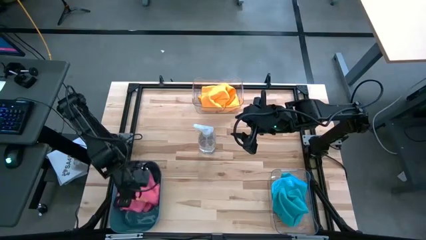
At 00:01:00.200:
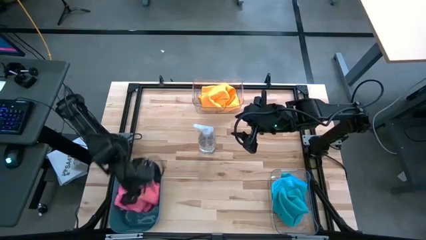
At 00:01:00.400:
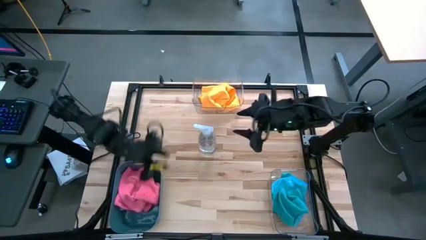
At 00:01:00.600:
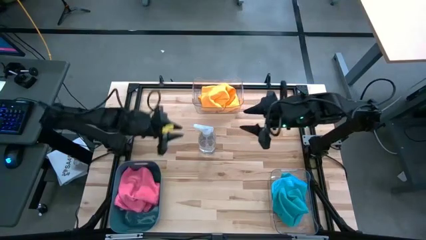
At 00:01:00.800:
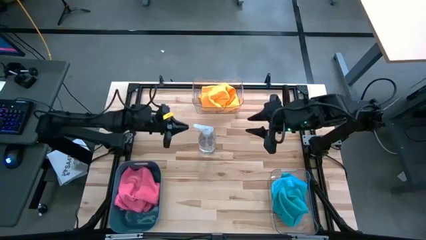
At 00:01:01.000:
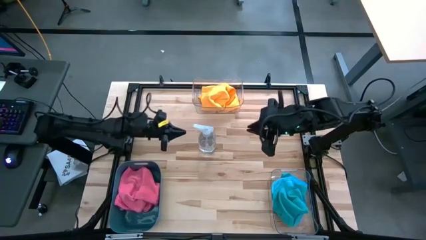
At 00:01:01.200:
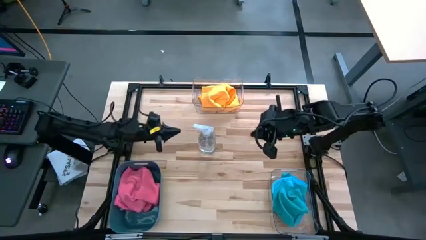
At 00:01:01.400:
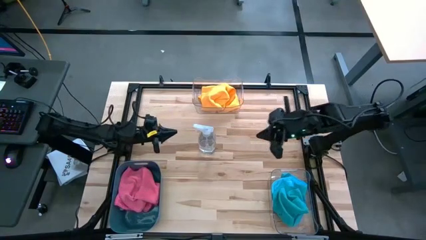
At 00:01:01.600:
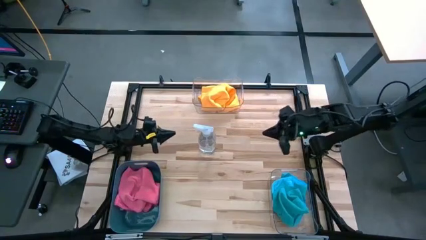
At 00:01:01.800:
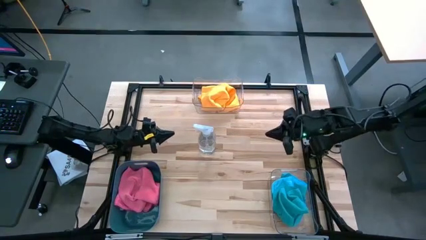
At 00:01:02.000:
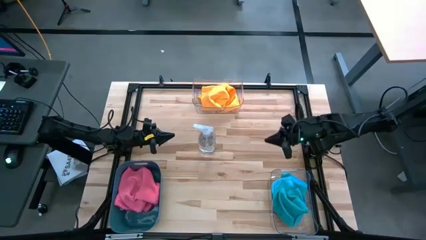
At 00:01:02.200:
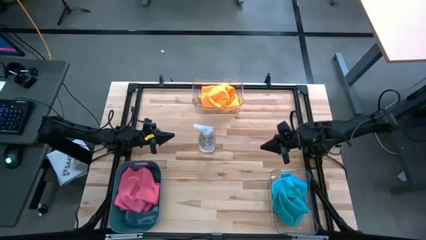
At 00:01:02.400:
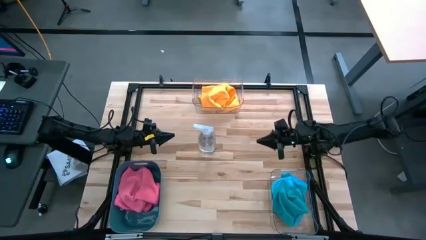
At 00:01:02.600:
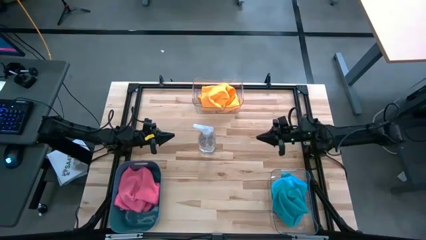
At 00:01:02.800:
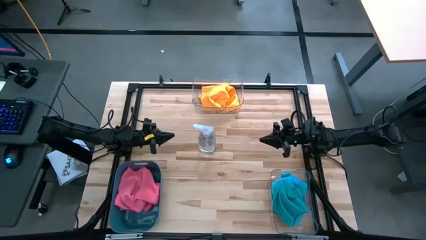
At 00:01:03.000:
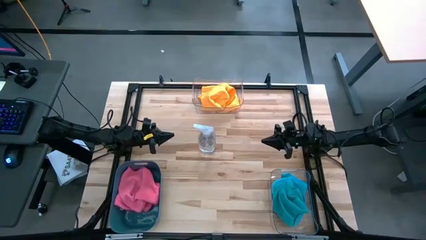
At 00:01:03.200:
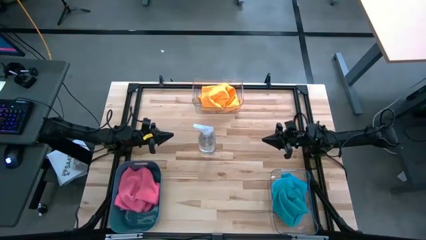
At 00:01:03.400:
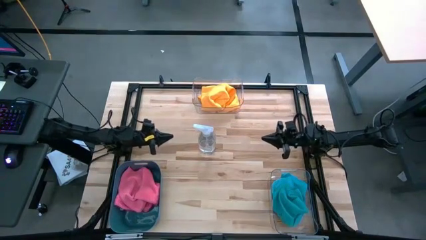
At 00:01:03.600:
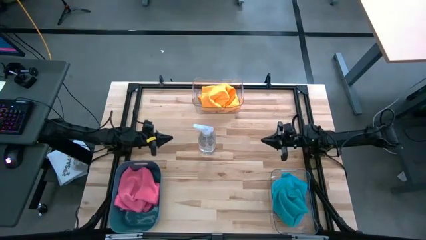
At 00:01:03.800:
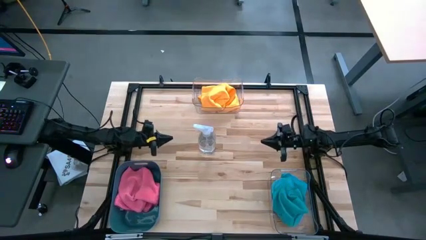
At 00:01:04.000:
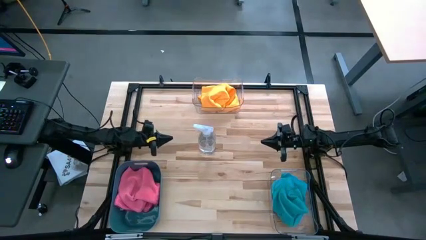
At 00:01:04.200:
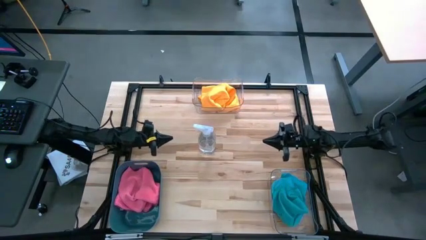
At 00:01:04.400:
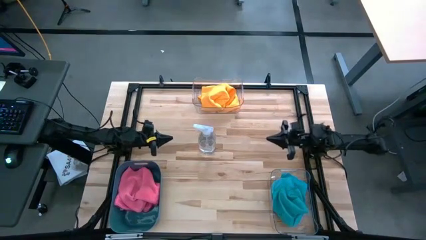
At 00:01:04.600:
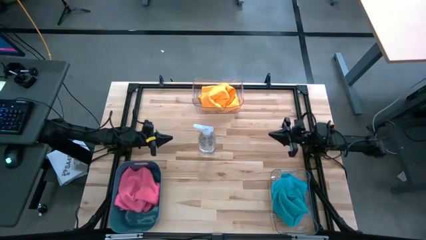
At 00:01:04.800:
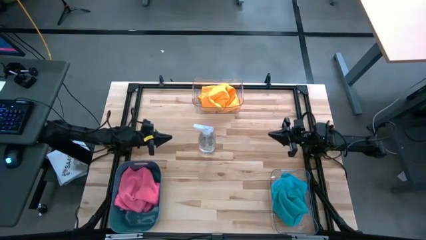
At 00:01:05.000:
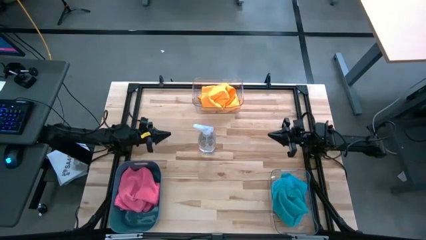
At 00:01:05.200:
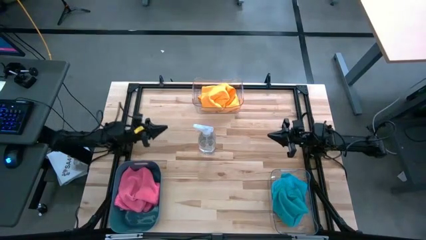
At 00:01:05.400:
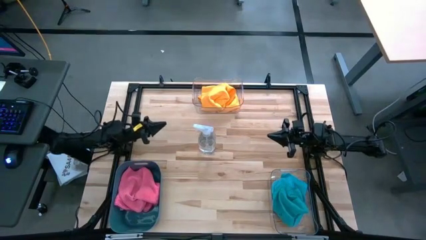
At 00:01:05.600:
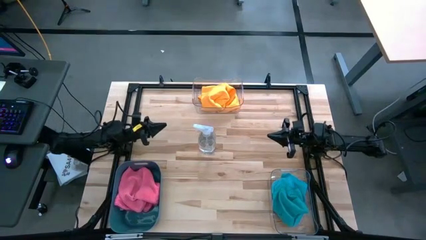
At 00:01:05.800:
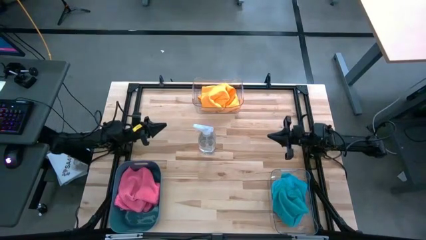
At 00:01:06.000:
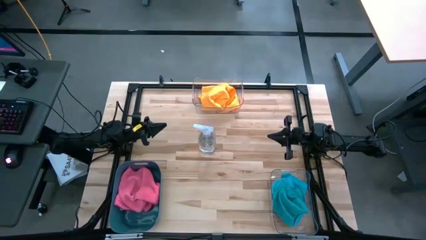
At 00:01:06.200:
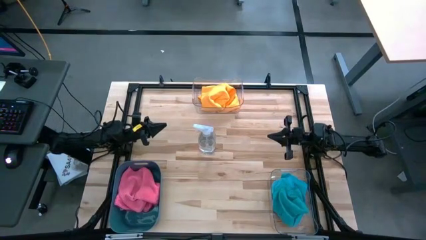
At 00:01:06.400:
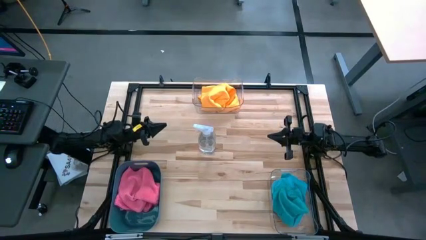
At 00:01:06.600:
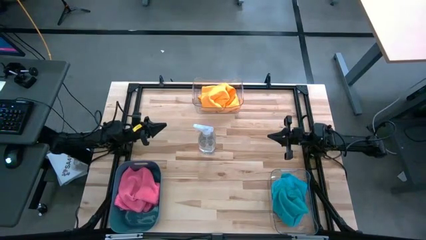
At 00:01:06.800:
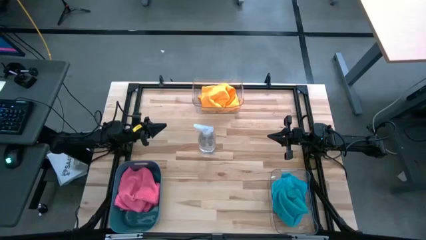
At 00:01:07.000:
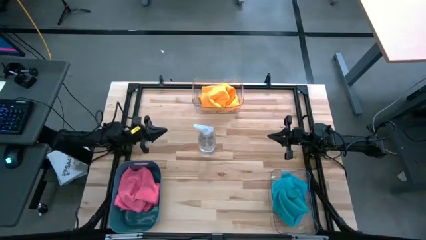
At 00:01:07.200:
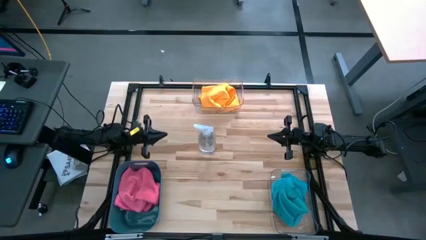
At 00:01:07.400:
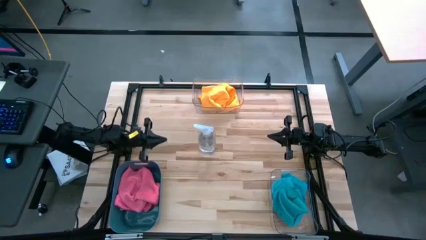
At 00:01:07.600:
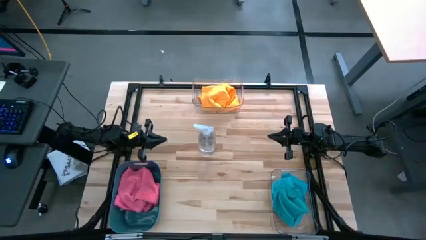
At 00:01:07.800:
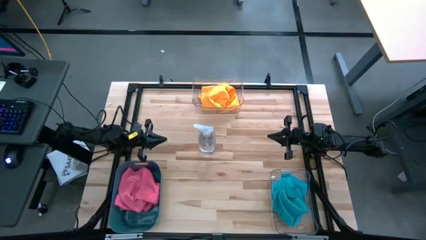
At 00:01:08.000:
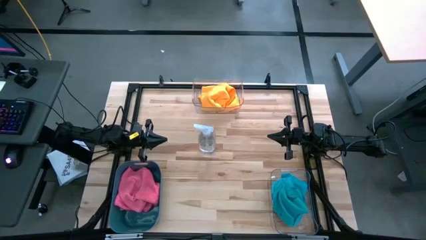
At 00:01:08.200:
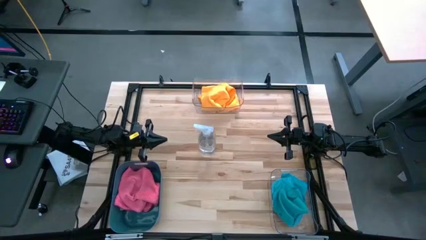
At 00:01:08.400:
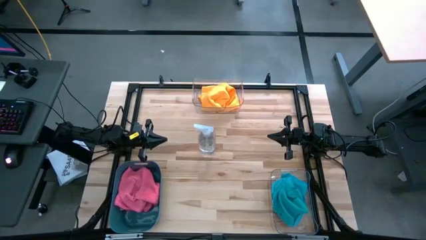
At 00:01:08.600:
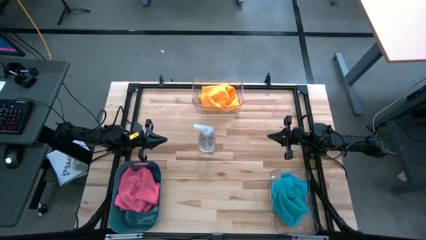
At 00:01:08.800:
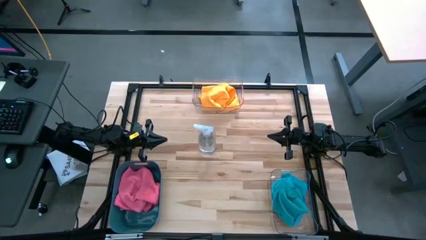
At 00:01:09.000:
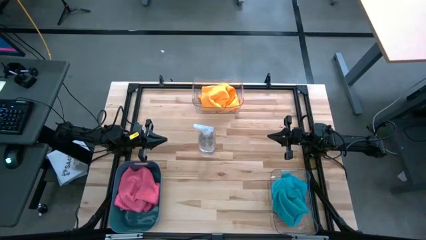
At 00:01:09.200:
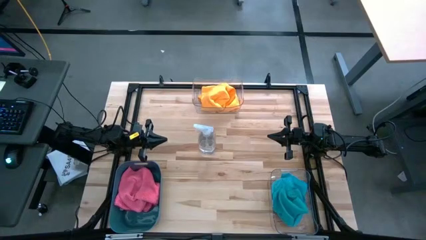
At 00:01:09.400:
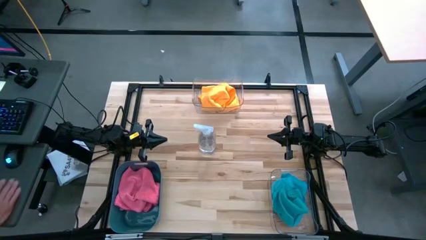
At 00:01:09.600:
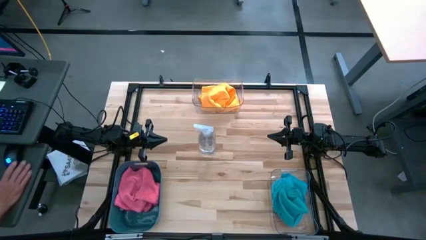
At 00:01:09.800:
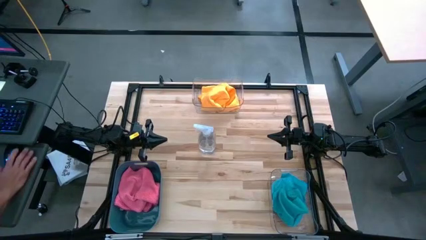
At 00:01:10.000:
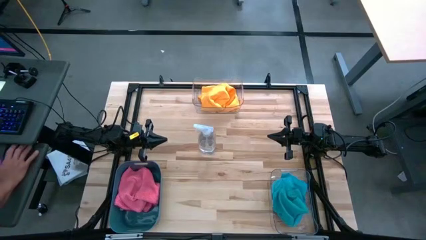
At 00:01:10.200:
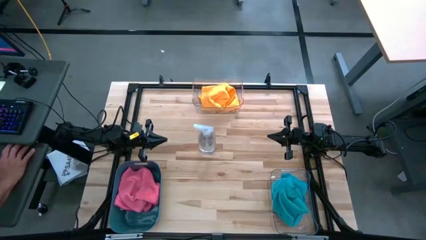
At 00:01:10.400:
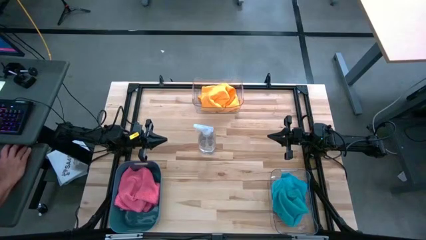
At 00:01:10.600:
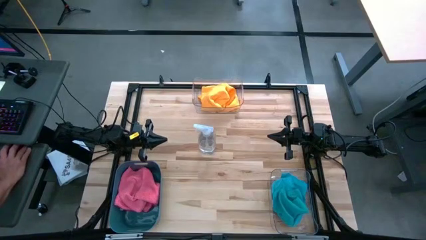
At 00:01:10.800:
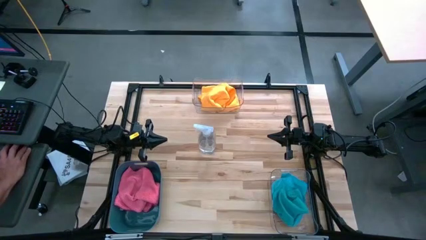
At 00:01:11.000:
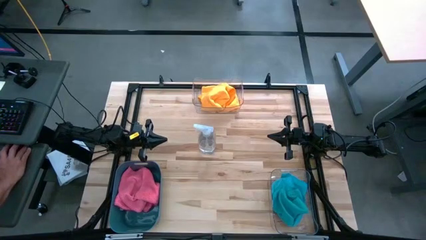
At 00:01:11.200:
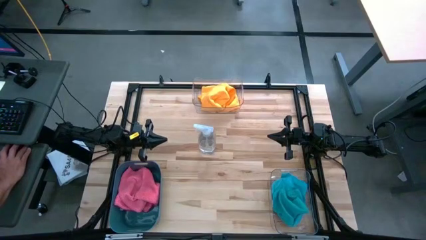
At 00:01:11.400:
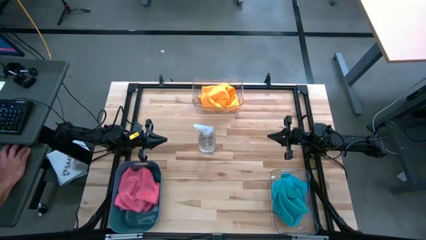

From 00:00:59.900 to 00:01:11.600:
Task: Sort microfiber towel by color & place in baskets
Return to Home Position

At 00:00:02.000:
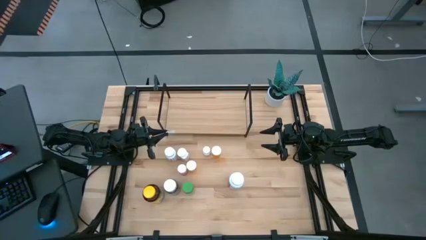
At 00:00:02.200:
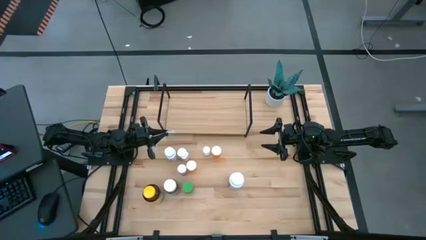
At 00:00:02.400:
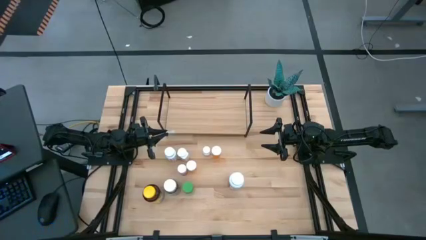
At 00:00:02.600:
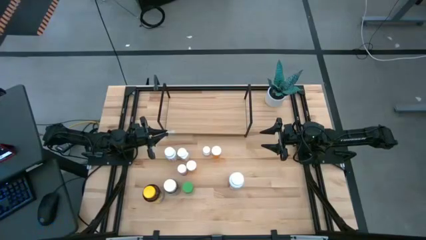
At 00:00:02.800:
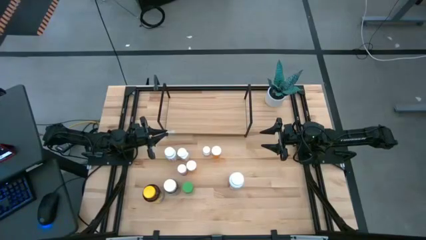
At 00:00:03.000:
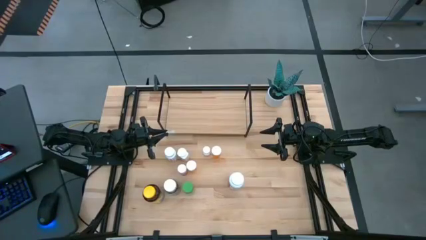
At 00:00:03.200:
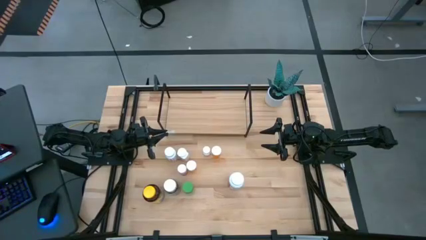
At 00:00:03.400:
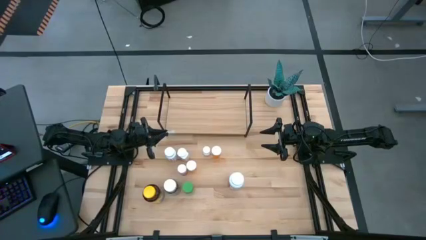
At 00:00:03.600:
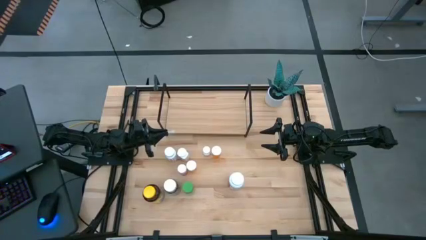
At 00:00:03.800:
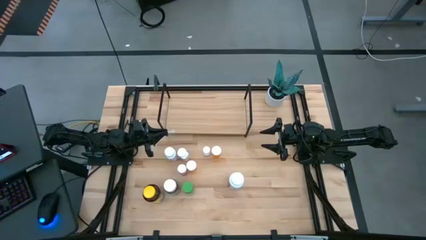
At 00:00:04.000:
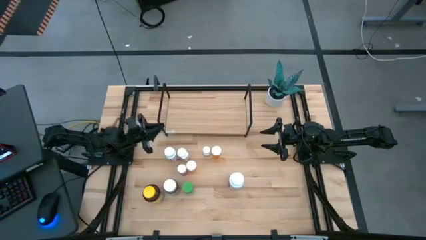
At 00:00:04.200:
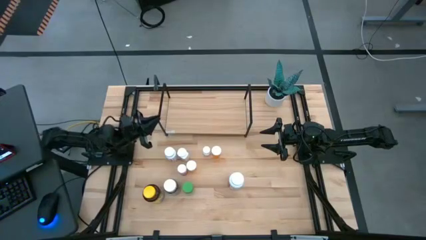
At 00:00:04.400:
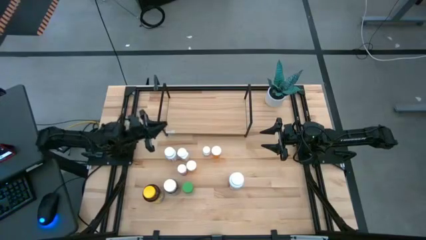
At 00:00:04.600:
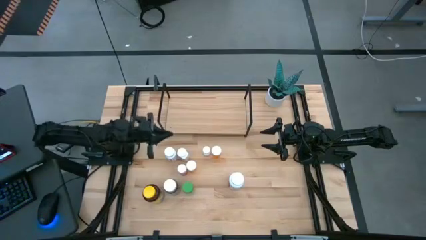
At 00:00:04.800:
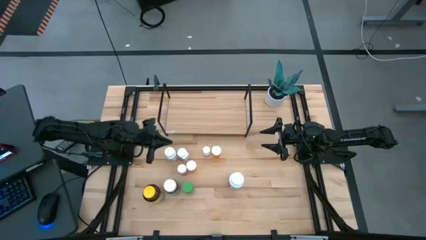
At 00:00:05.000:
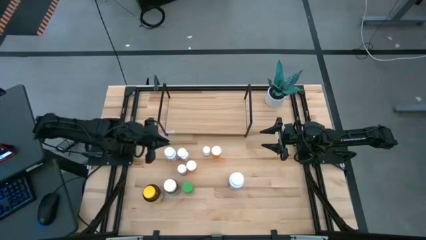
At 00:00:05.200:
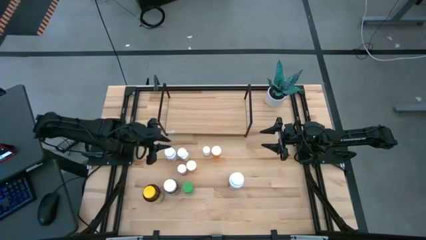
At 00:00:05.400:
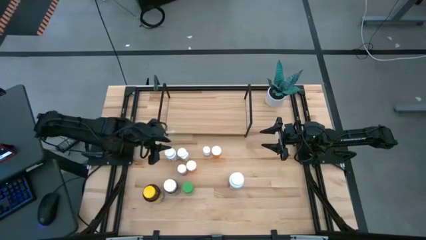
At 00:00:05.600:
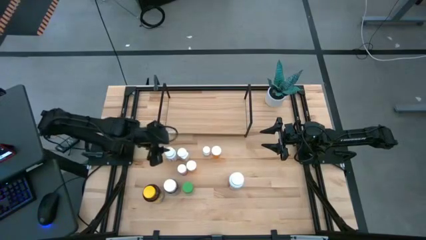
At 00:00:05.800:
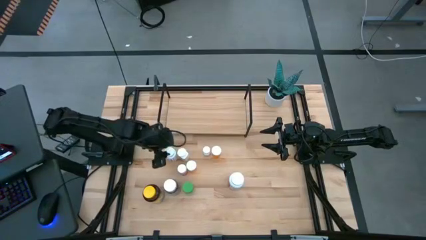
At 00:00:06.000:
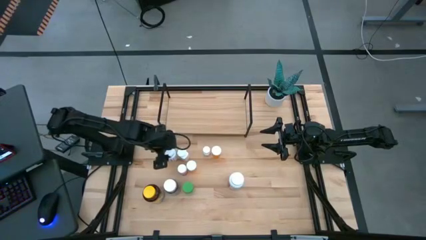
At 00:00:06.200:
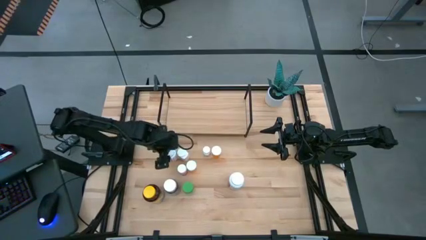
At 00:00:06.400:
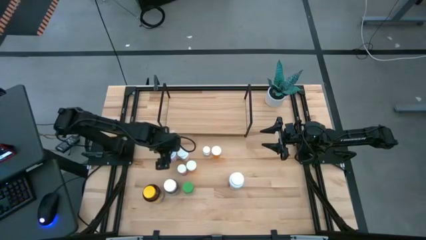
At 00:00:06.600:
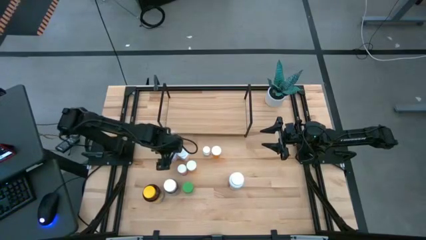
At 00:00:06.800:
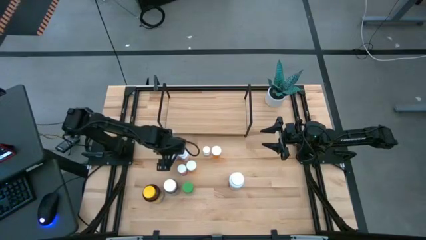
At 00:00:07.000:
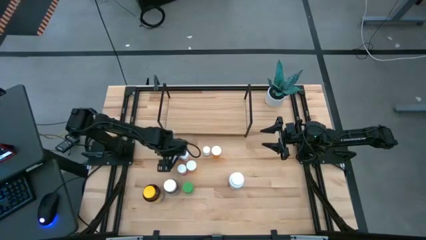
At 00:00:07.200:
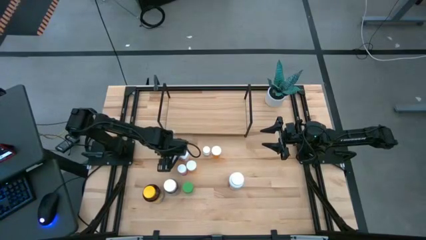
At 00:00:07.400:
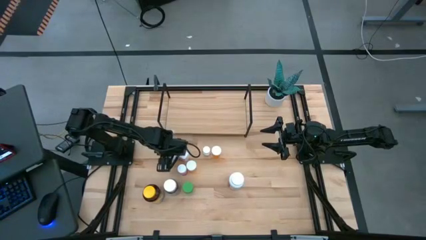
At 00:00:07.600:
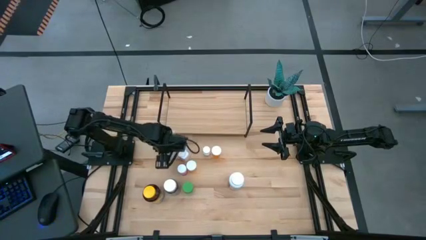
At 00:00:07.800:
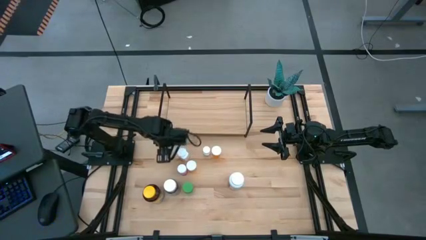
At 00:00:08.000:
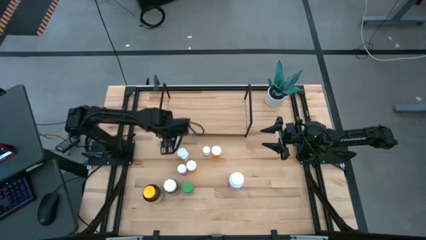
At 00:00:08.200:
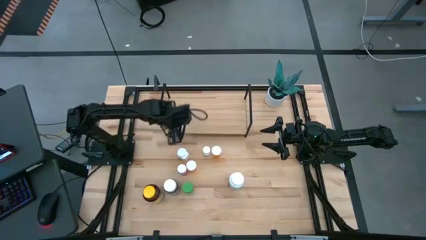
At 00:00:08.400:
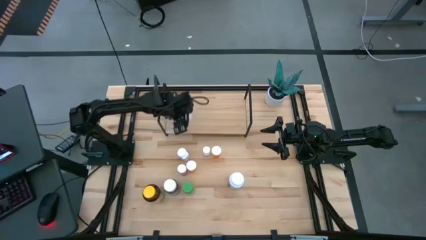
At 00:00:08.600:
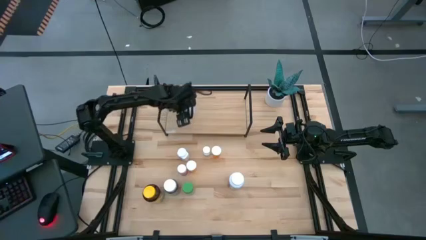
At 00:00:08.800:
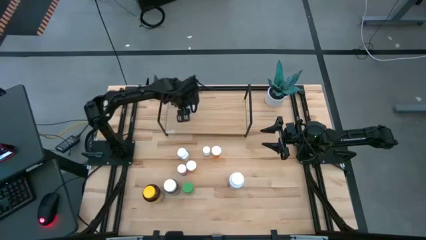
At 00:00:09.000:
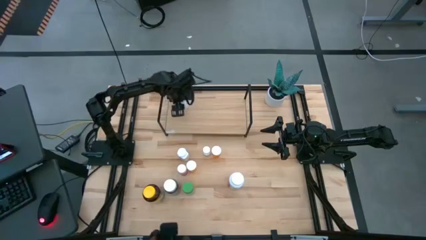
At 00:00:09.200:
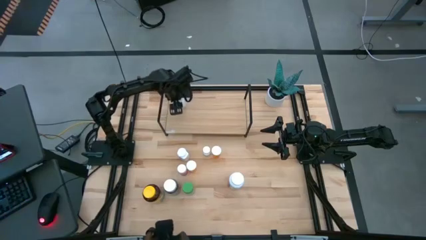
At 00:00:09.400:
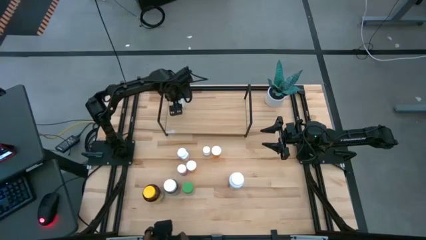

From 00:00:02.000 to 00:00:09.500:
Task: Pick and place medicine bottles onto shelf by color
Put the left white bottle on the shelf
